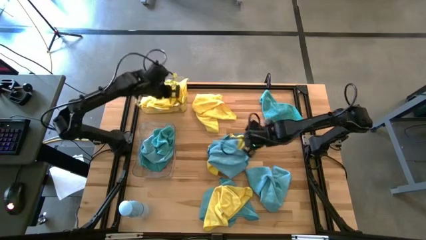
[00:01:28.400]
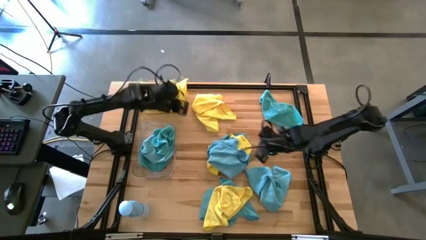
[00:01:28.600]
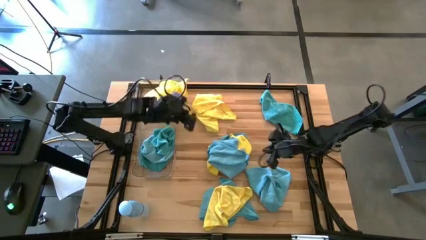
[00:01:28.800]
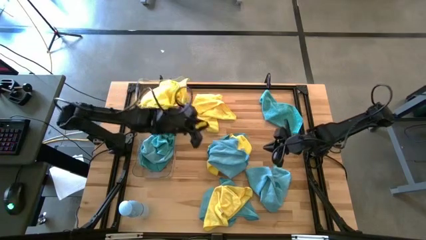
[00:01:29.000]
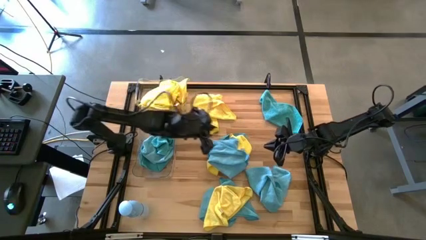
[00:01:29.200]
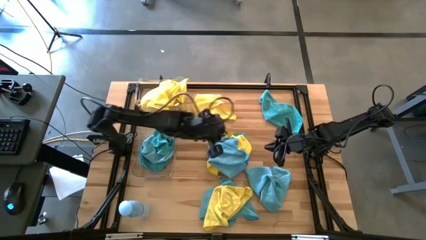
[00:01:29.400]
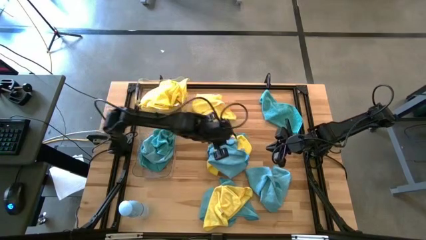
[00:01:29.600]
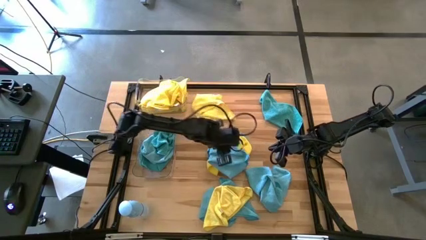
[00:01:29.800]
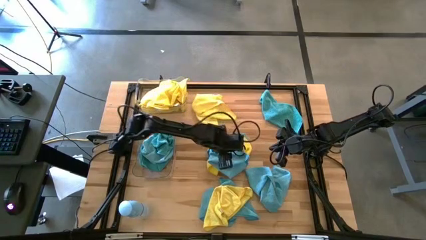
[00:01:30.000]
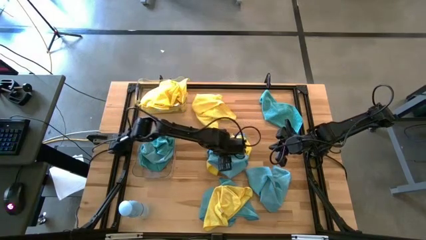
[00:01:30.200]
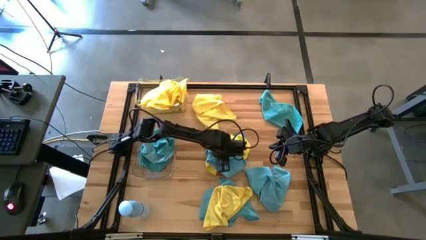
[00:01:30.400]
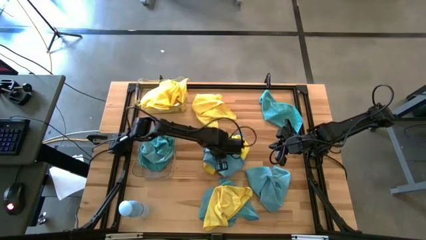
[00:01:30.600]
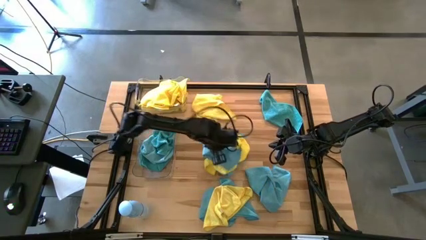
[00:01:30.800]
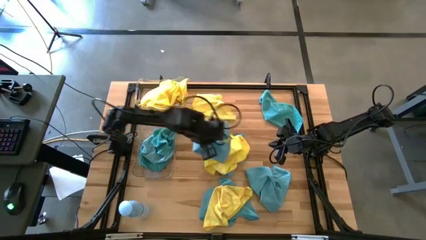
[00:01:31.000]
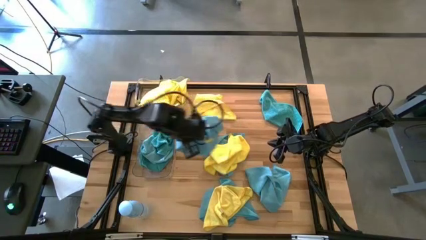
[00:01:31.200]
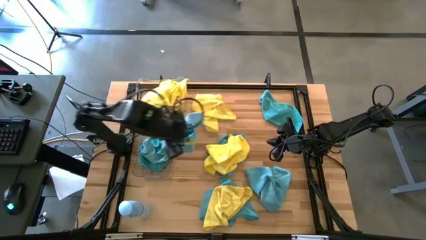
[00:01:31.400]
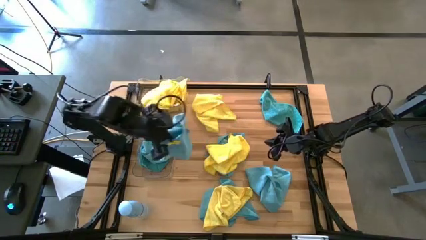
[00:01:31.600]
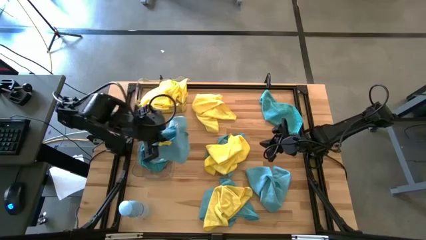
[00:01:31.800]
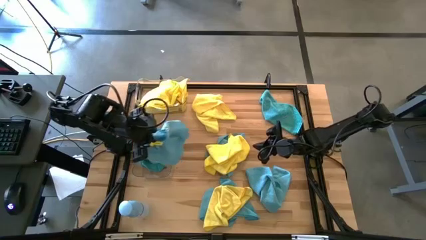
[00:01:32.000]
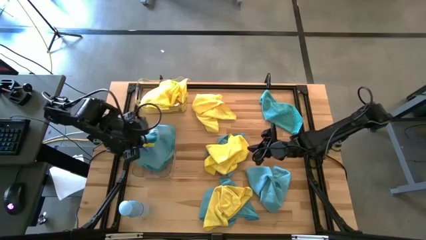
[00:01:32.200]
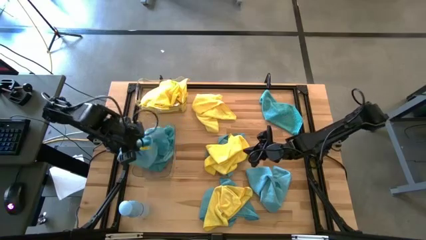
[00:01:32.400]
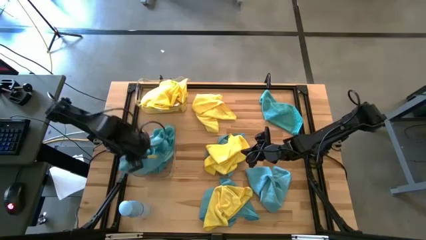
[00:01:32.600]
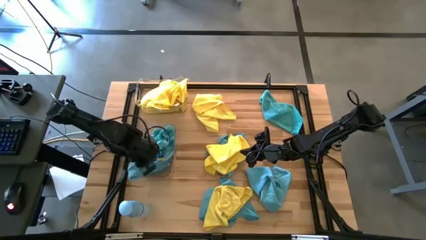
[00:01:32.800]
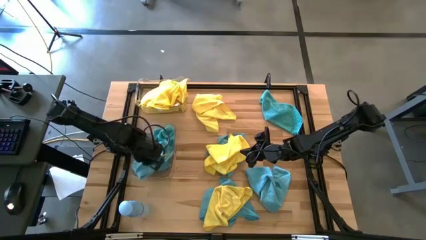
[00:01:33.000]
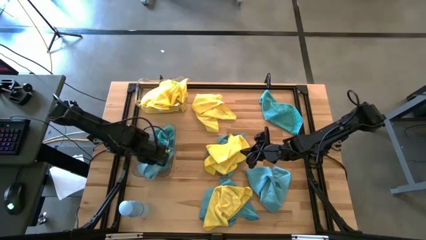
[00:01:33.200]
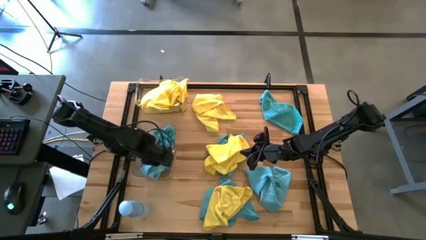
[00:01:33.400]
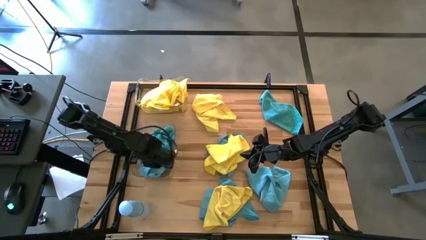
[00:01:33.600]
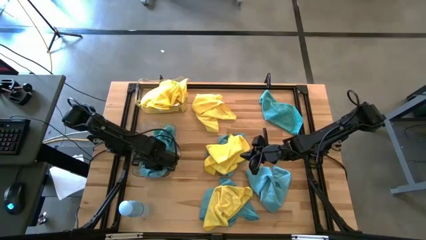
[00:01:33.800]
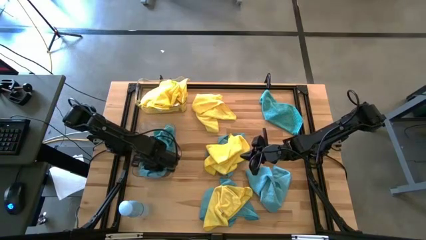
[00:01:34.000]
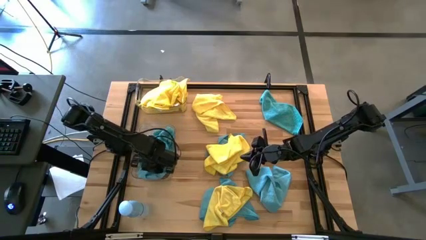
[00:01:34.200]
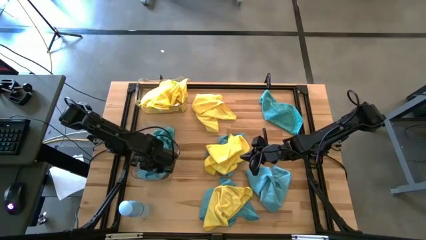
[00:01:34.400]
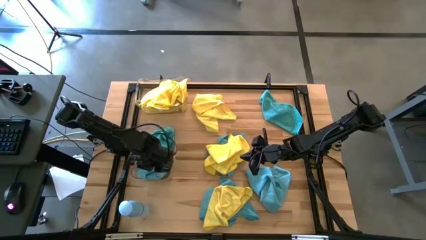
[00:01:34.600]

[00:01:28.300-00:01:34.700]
Task: Sort microfiber towel by color & place in baskets
Put the blue microfiber cloth into the bottom transparent bin

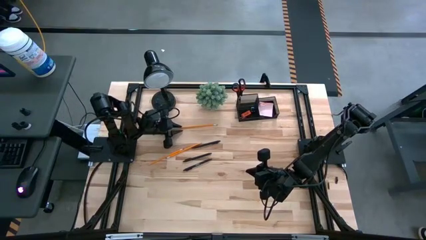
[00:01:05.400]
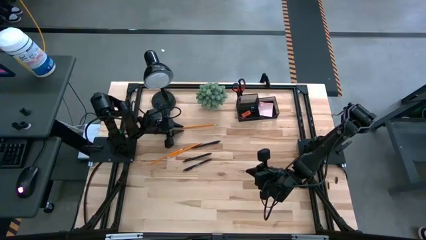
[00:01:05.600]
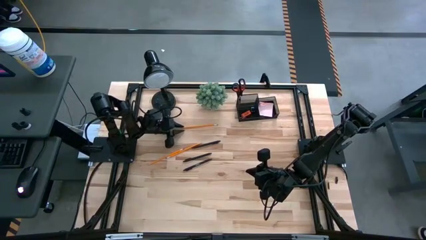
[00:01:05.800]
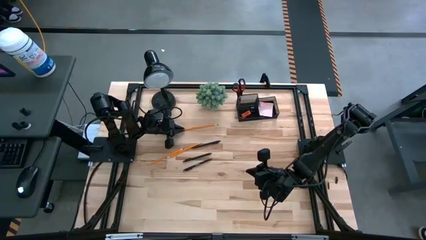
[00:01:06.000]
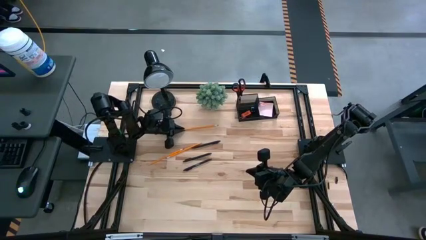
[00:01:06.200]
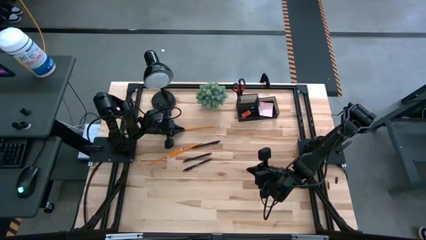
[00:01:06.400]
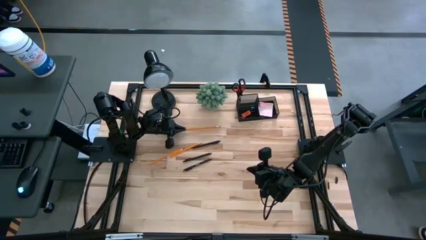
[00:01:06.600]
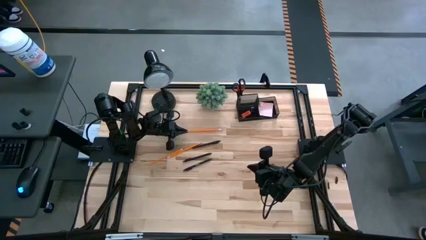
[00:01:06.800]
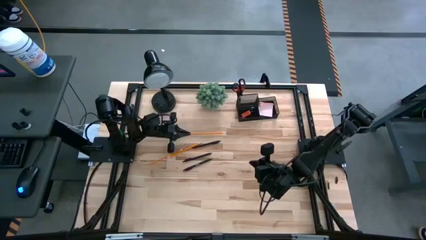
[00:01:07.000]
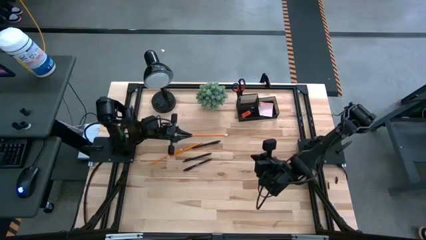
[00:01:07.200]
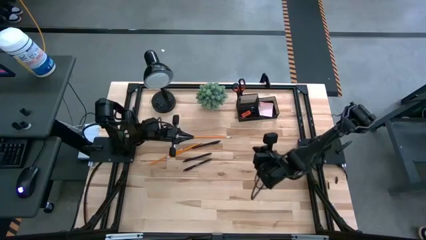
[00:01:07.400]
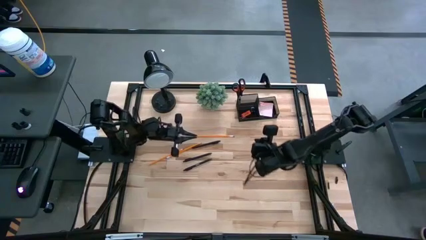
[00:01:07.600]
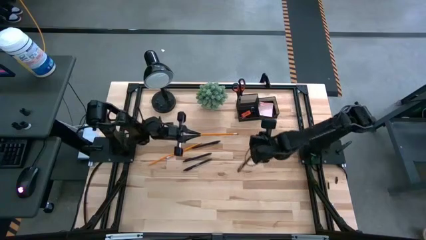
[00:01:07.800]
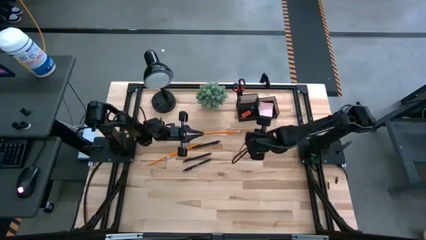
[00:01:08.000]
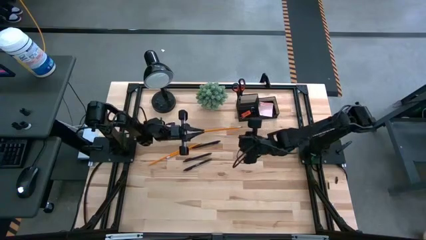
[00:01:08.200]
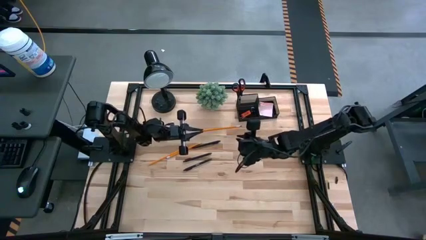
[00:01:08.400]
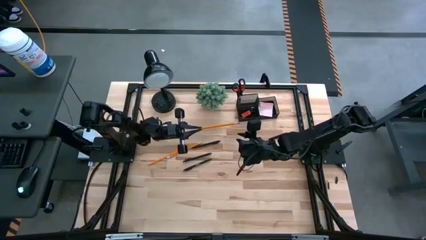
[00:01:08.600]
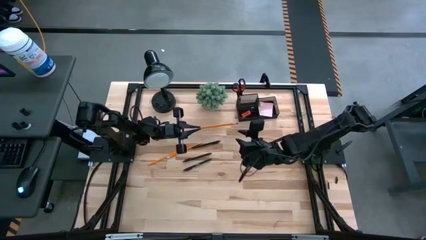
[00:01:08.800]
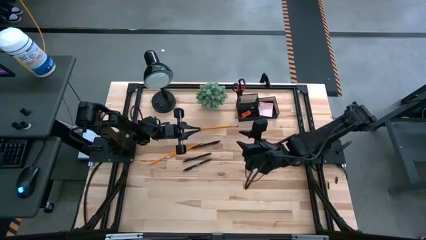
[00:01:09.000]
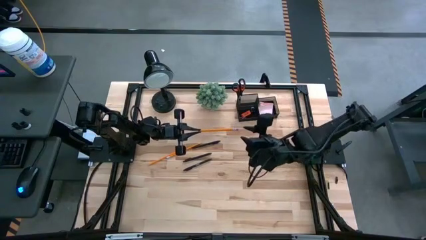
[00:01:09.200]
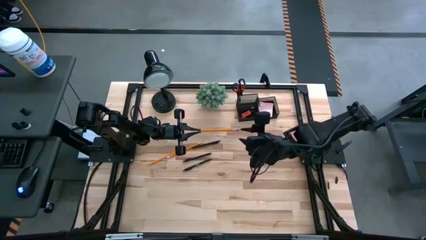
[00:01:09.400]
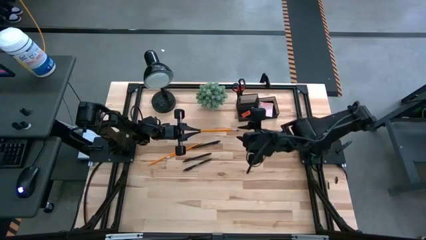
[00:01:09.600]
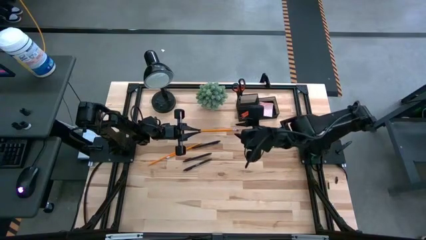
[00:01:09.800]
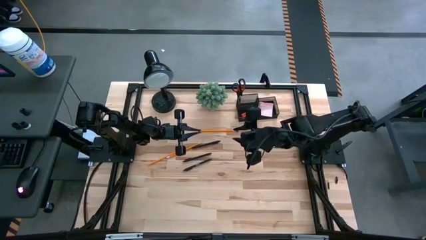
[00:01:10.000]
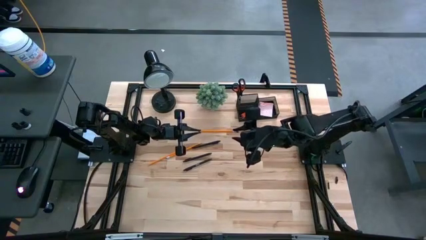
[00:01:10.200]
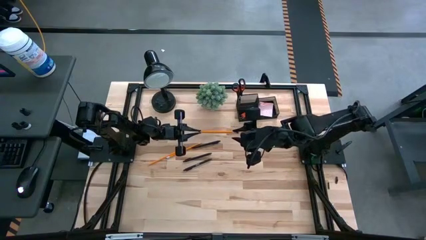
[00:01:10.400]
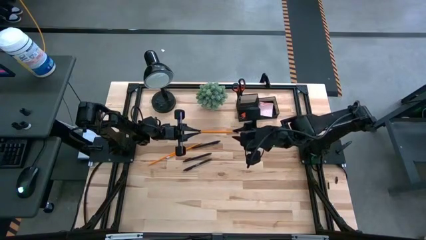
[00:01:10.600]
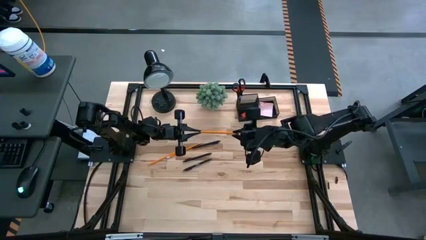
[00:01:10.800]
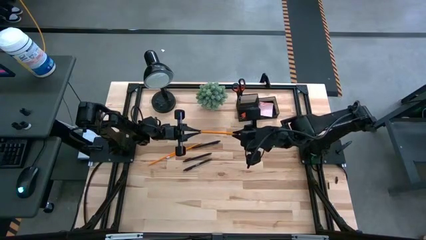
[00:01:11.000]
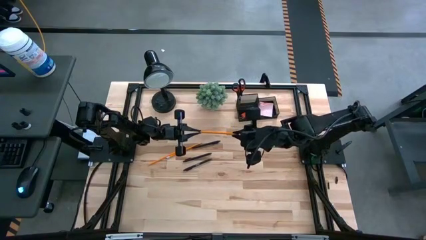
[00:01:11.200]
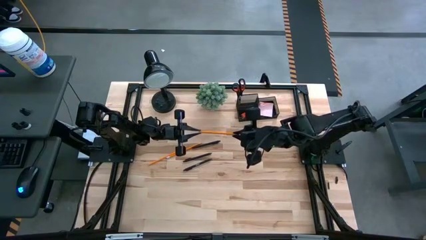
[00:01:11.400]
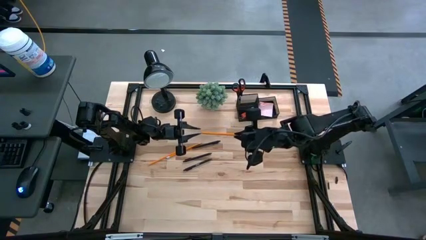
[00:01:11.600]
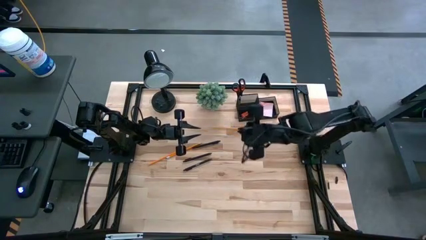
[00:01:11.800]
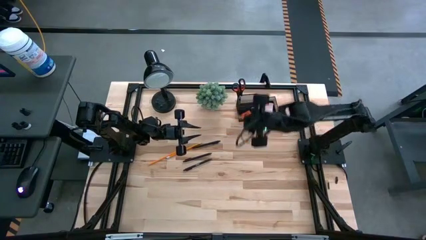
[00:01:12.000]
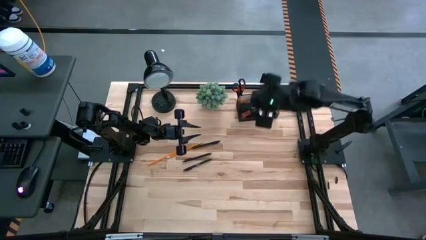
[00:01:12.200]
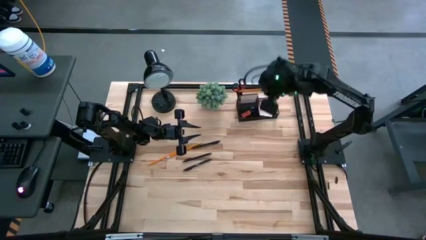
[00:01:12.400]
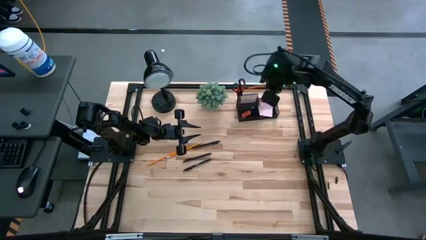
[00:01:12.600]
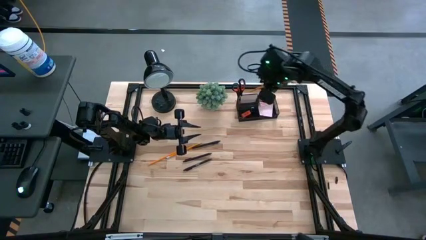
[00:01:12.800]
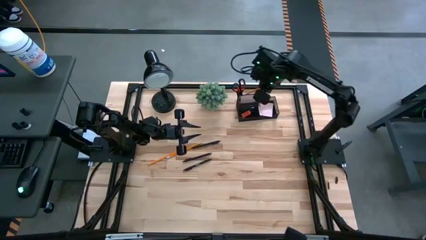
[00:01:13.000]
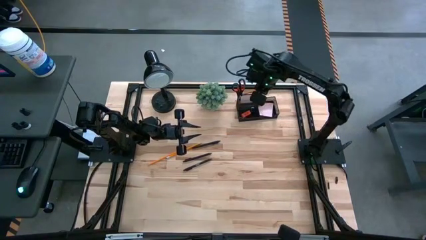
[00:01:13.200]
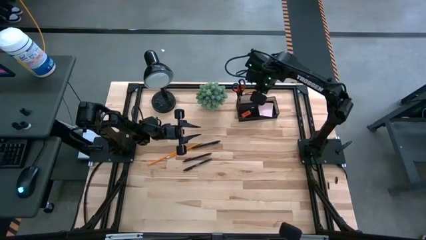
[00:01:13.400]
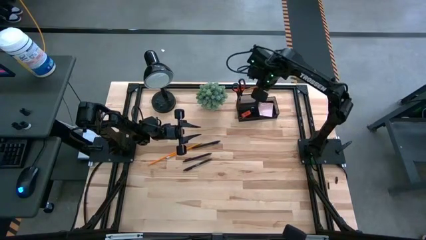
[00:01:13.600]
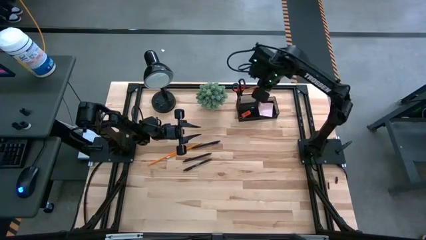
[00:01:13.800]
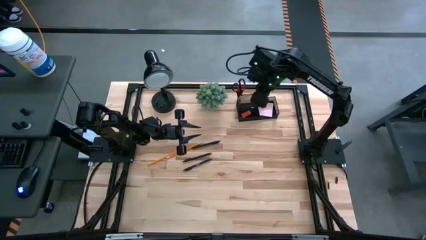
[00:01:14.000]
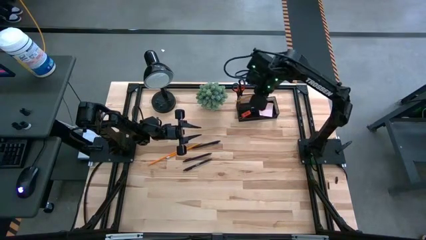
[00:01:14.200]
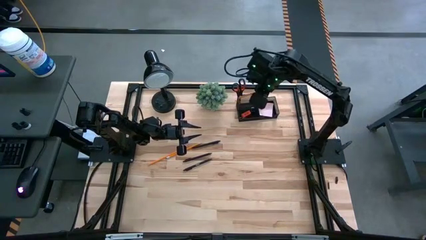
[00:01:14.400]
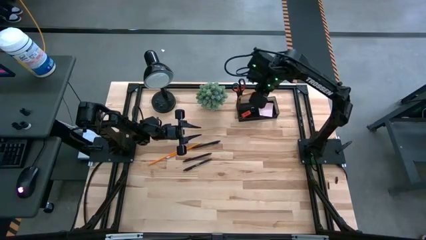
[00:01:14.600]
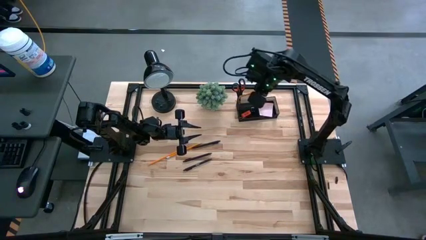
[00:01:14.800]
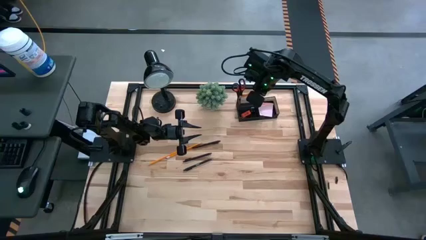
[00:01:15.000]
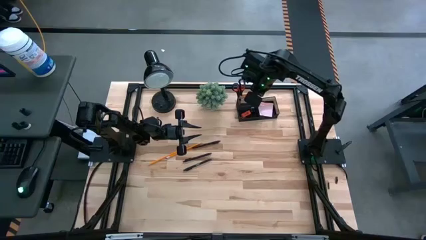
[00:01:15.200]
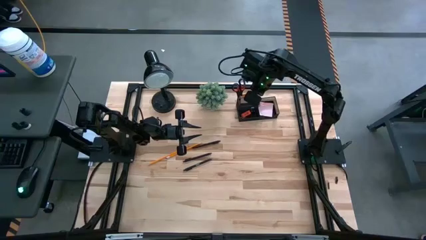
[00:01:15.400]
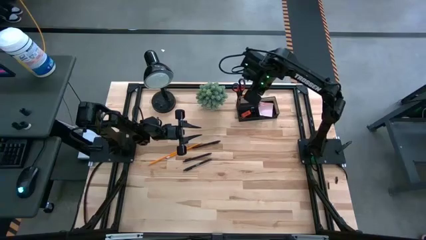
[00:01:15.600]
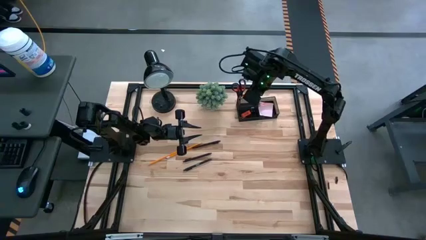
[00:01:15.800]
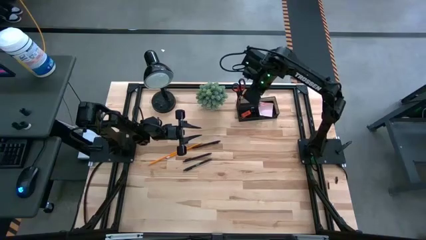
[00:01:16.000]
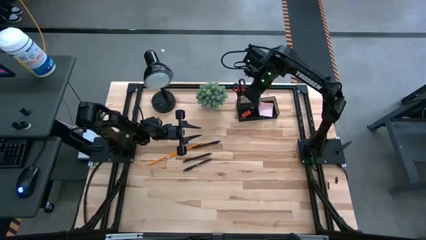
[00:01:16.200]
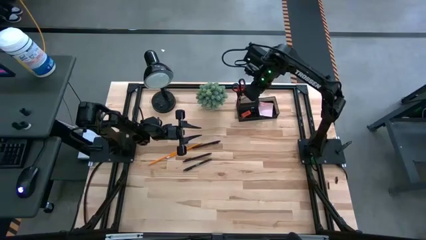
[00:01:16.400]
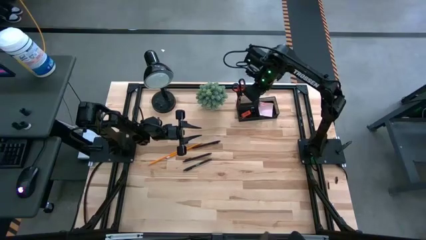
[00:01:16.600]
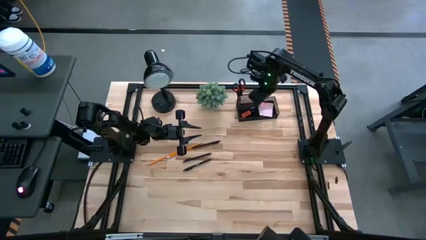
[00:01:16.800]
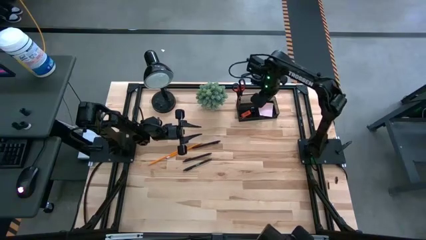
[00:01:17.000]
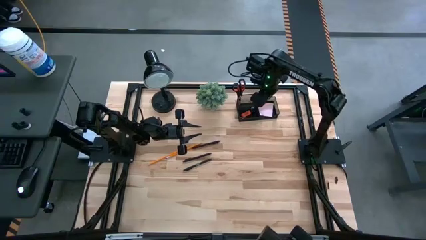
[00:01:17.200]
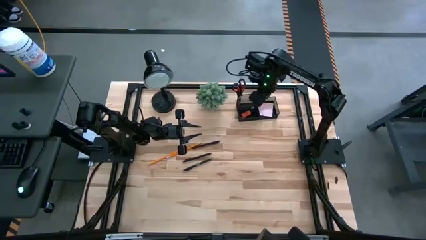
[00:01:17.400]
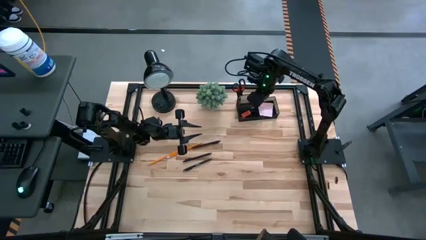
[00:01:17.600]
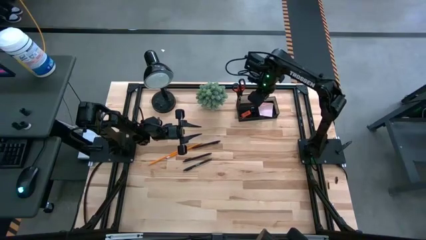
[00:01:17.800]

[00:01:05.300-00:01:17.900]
Task: Pick and place office supplies into organizer
Put the top orange pencil into the black desk organizer
